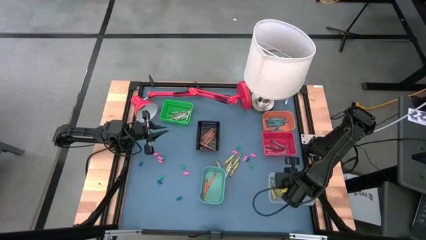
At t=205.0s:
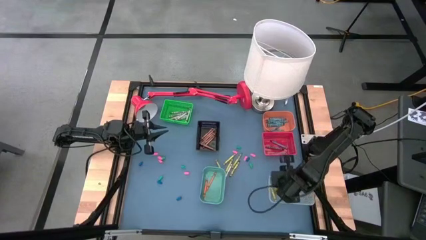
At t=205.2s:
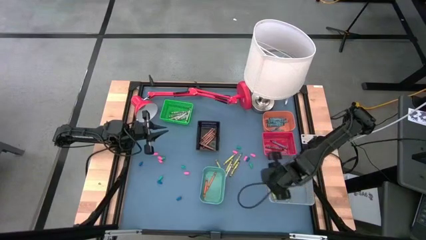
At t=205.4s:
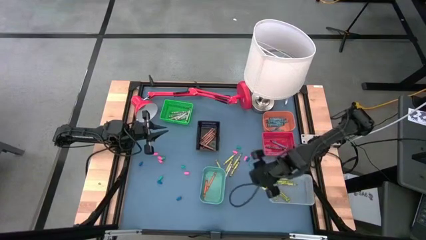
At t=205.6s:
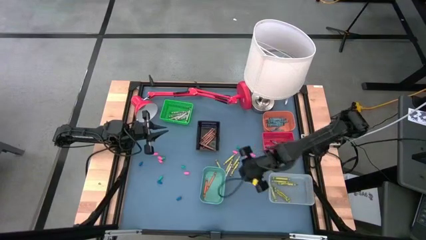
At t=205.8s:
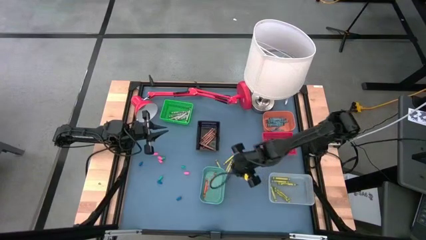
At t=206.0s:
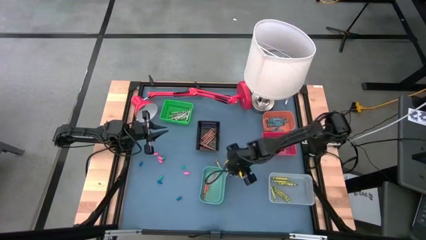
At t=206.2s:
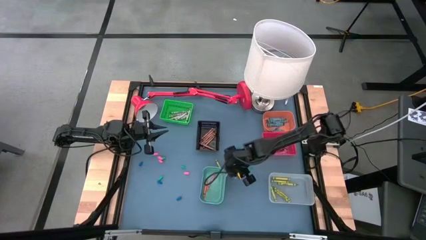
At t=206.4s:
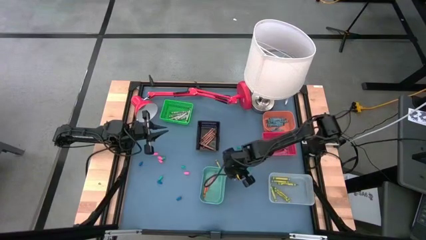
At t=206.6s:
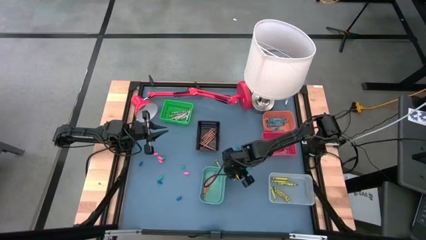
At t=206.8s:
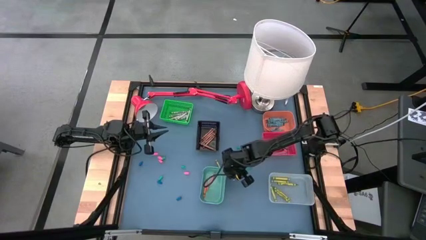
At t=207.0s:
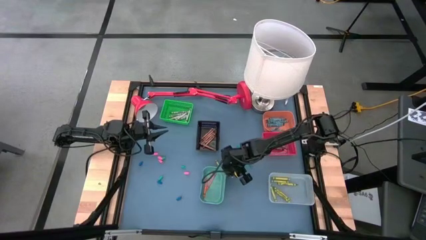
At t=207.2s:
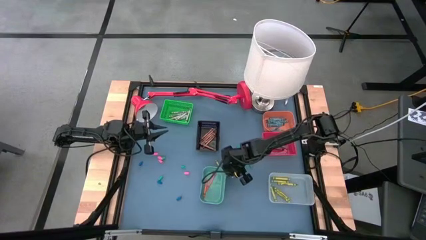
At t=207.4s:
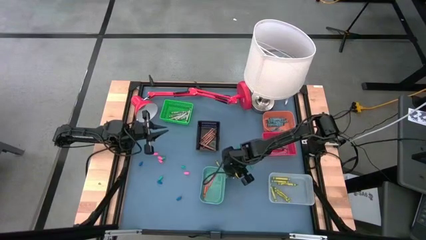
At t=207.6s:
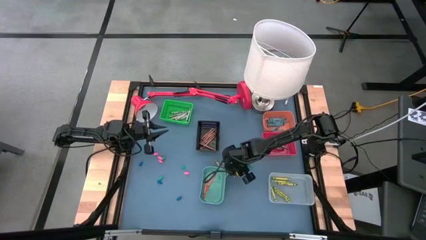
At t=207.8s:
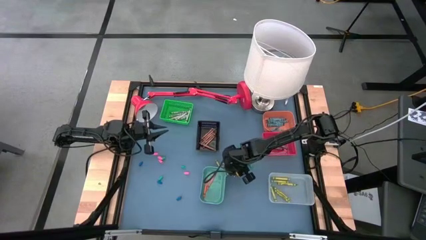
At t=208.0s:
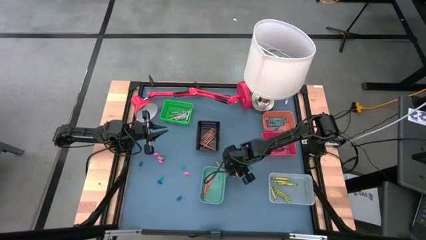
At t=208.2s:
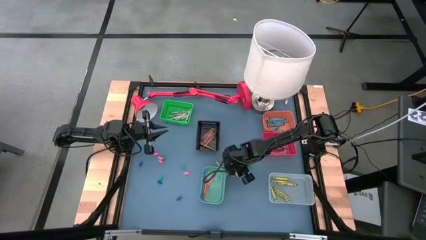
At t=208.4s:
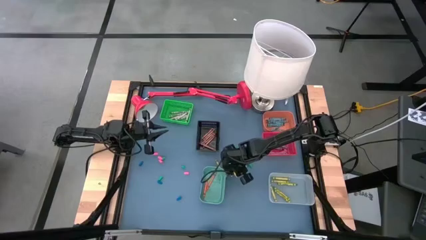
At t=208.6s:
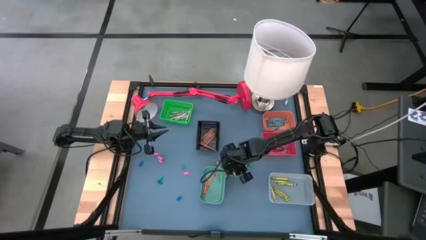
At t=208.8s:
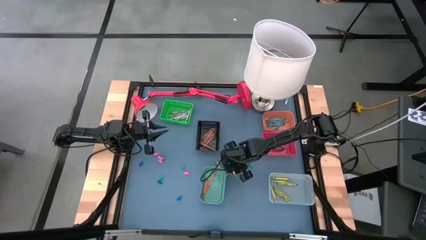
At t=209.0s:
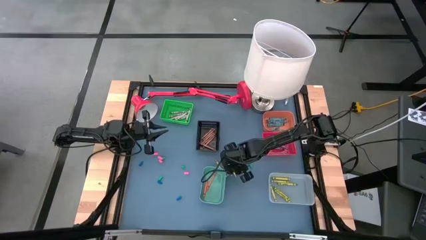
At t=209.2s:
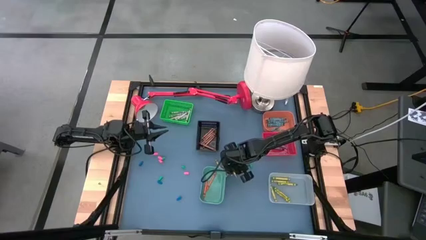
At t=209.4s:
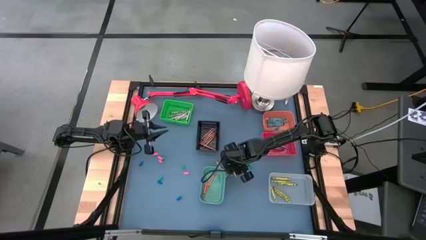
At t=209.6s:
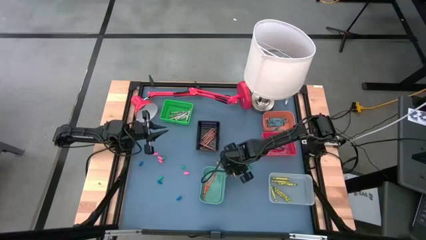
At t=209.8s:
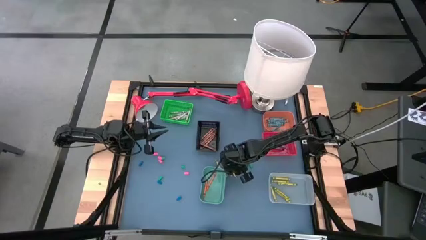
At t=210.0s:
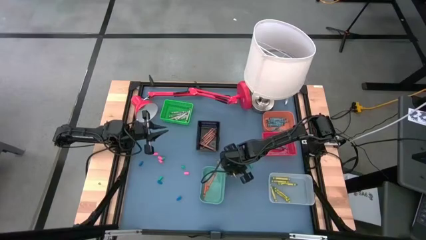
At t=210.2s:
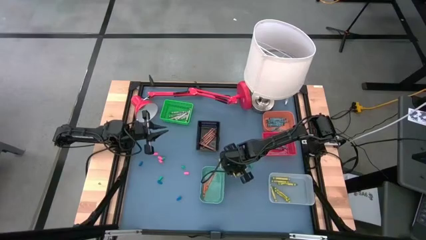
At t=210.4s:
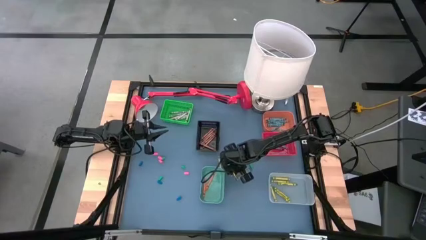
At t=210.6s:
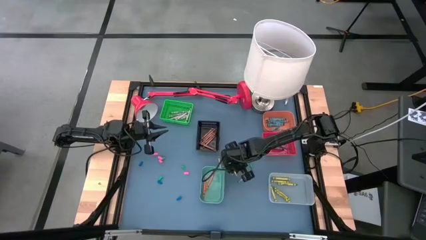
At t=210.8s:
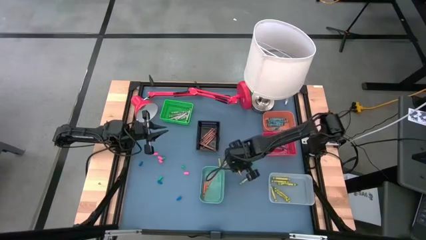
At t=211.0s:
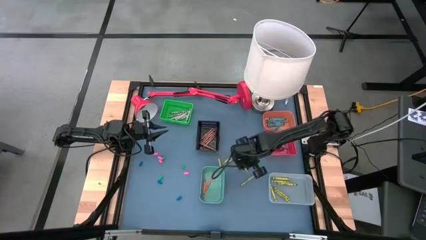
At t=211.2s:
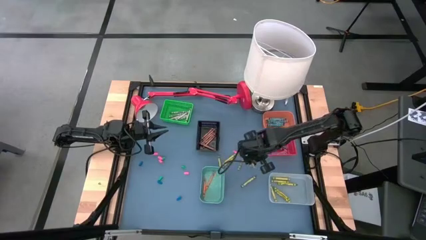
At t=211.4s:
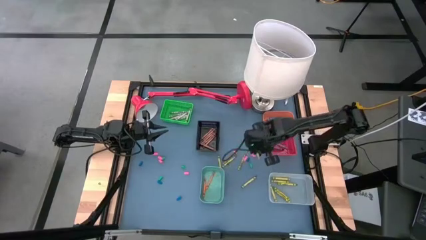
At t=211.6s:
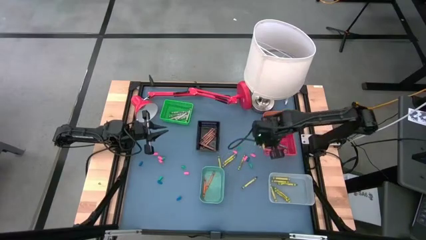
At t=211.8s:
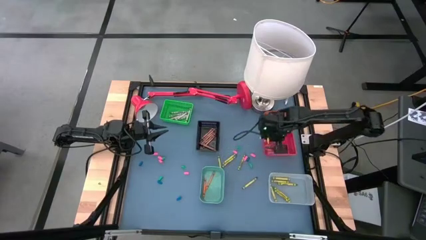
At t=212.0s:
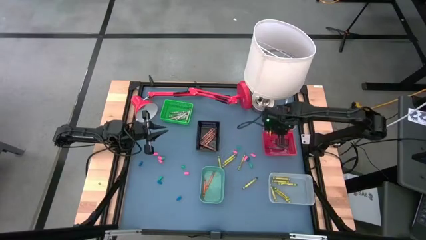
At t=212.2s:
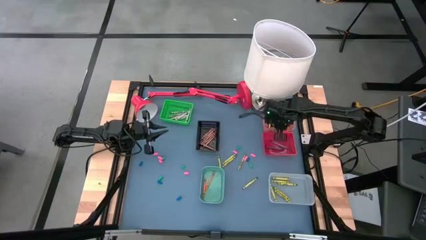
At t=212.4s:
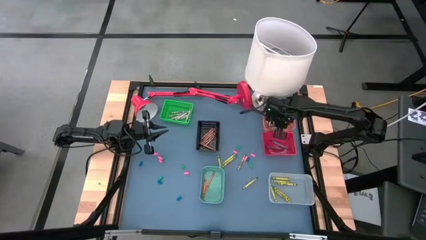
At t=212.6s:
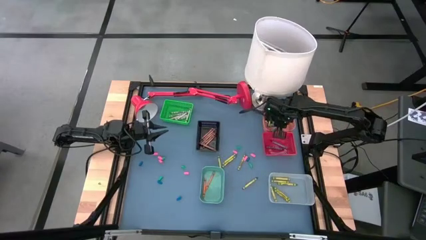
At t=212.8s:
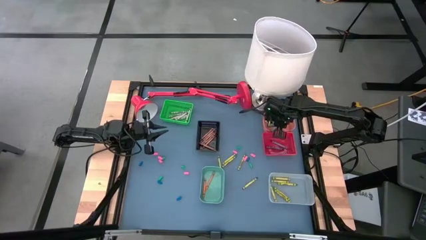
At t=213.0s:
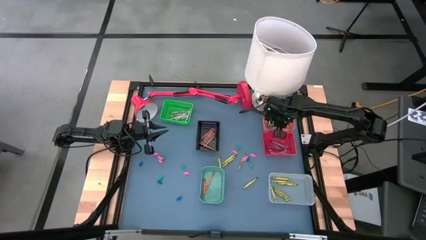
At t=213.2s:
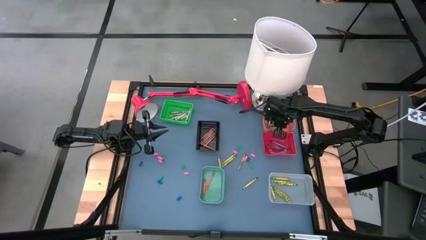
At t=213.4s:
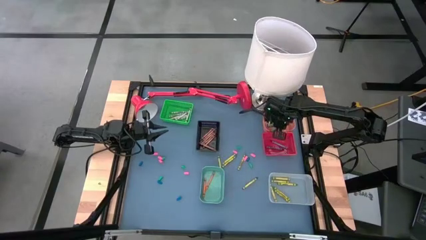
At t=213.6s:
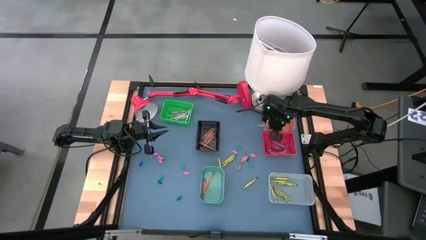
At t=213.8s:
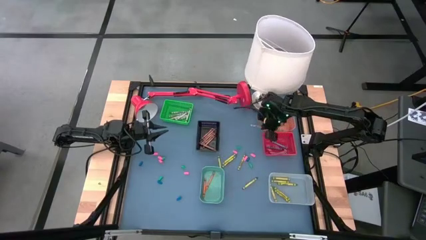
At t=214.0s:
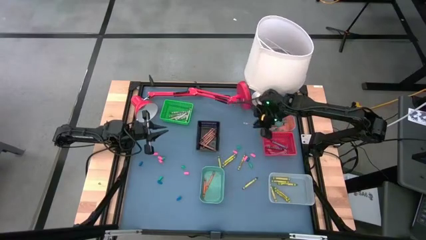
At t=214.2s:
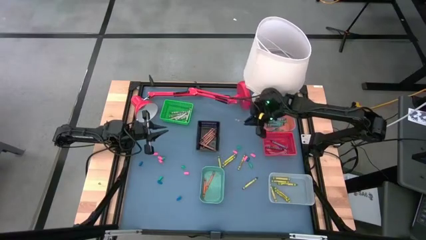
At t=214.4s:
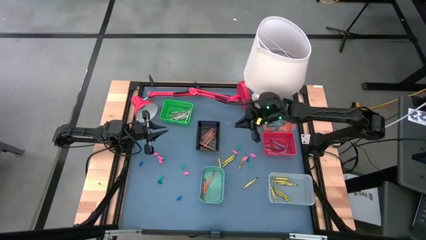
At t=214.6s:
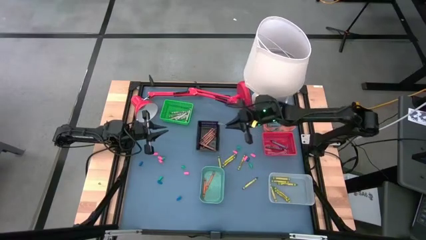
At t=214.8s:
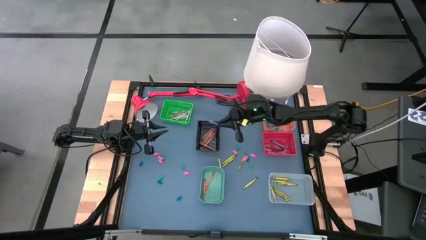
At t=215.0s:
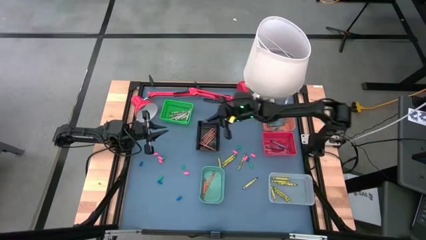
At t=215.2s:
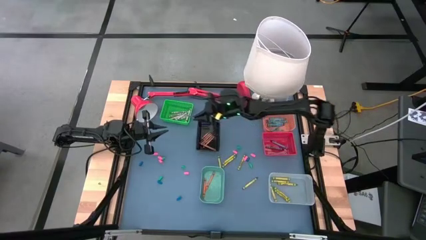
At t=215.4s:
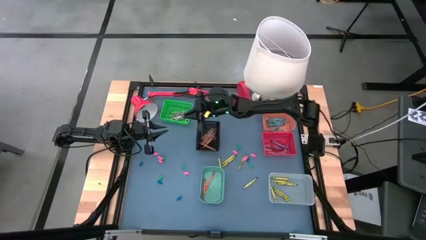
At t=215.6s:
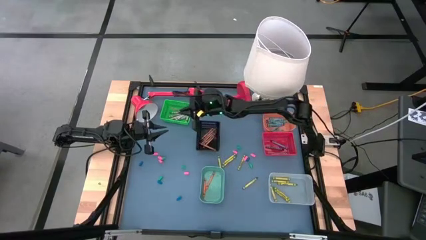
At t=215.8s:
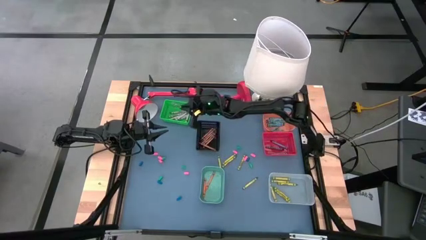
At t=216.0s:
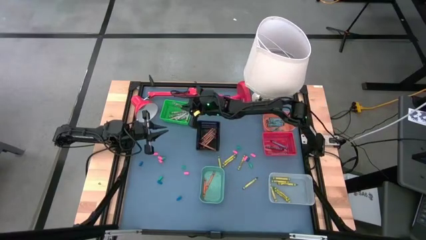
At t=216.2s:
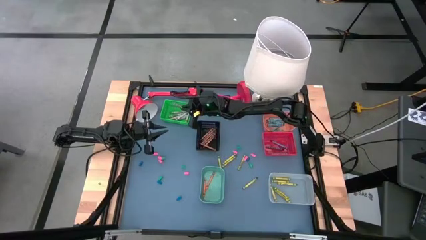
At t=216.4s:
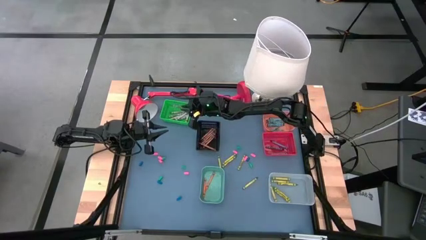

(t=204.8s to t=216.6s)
Task: Sort crayons
Put the gray crayon into the green bin

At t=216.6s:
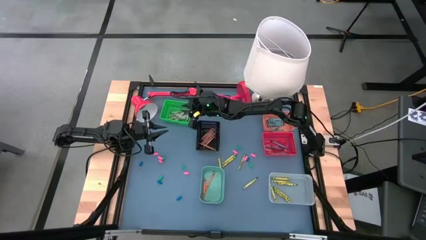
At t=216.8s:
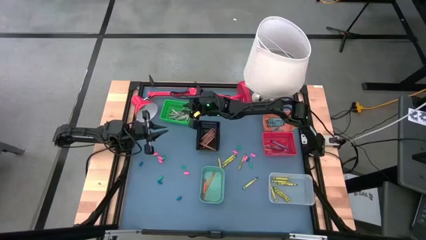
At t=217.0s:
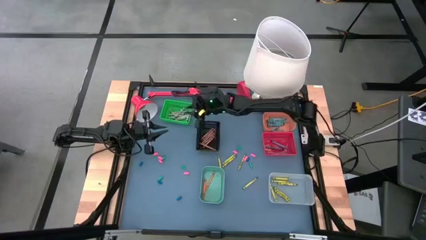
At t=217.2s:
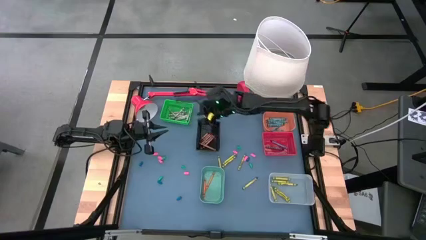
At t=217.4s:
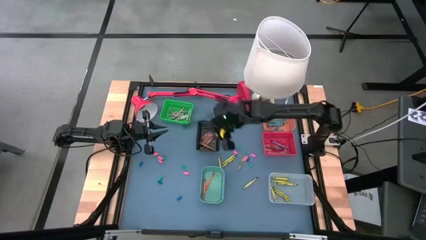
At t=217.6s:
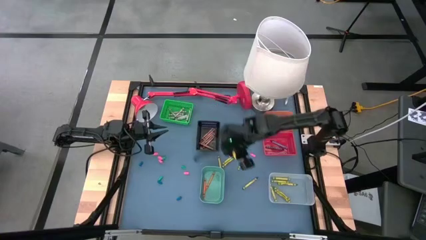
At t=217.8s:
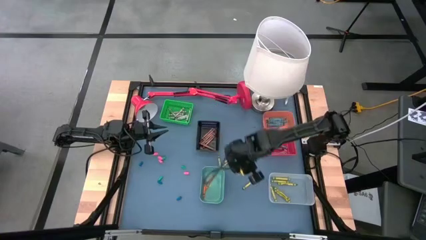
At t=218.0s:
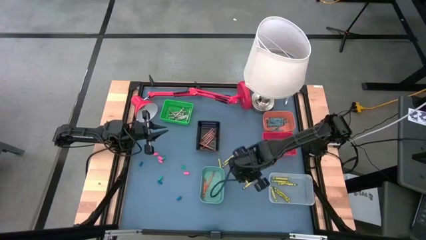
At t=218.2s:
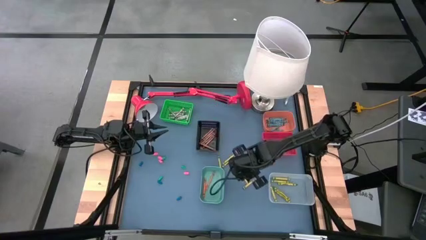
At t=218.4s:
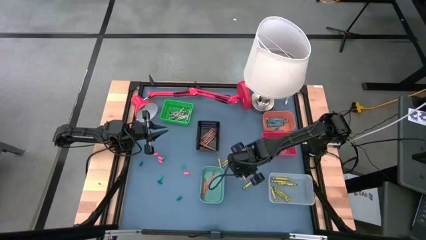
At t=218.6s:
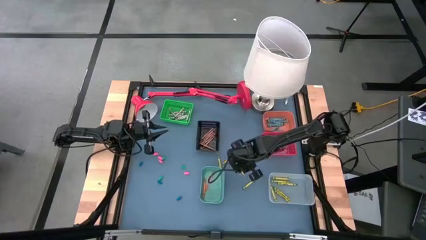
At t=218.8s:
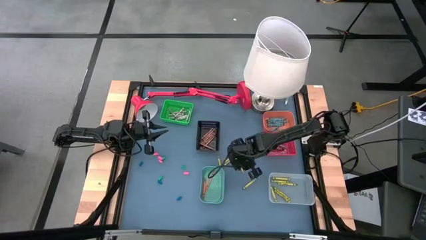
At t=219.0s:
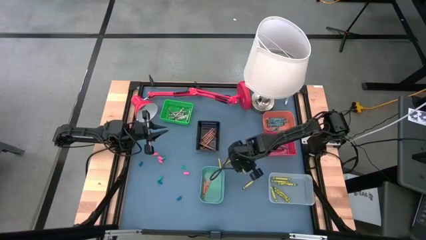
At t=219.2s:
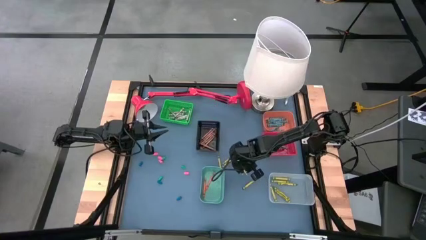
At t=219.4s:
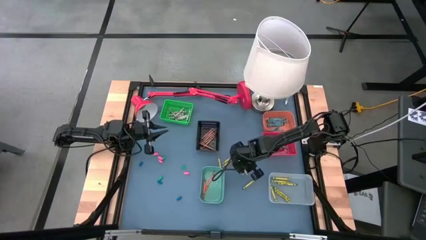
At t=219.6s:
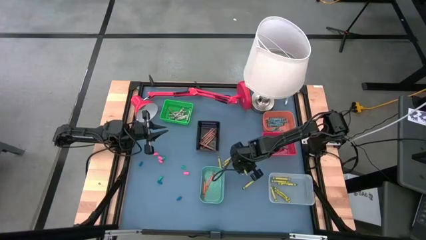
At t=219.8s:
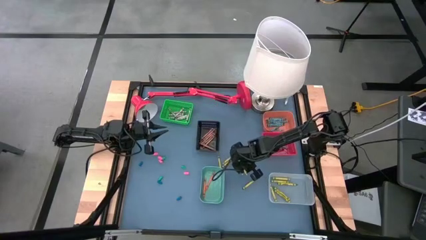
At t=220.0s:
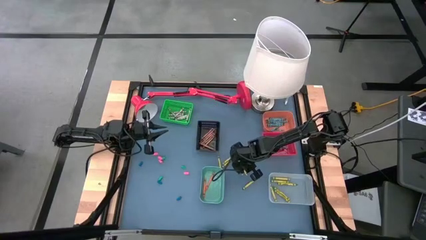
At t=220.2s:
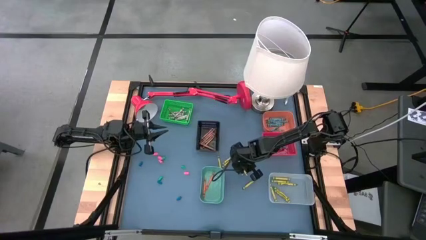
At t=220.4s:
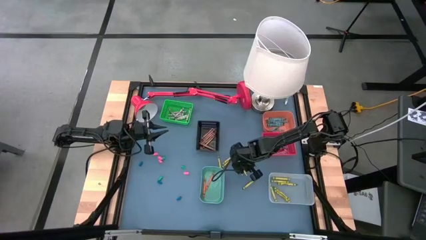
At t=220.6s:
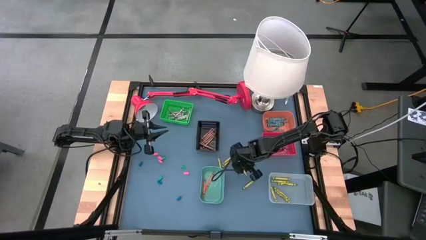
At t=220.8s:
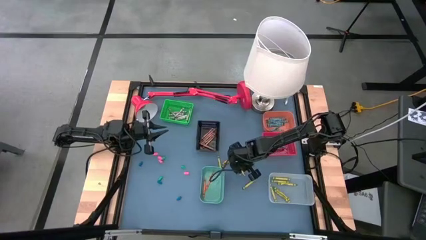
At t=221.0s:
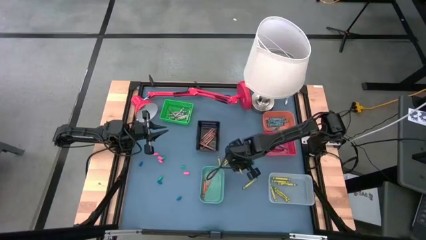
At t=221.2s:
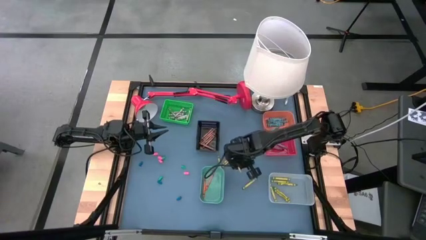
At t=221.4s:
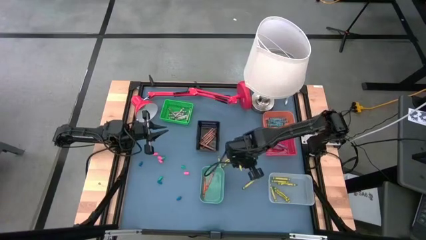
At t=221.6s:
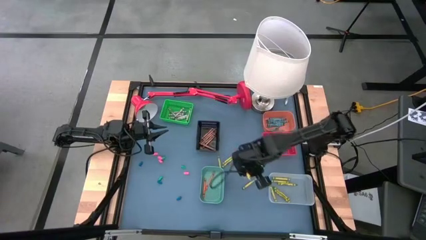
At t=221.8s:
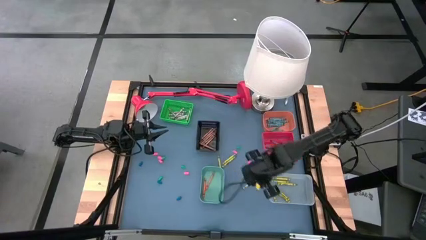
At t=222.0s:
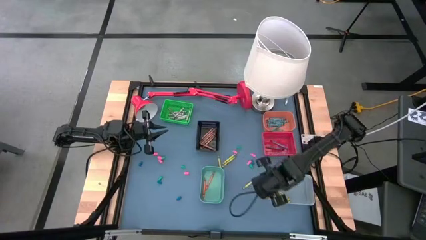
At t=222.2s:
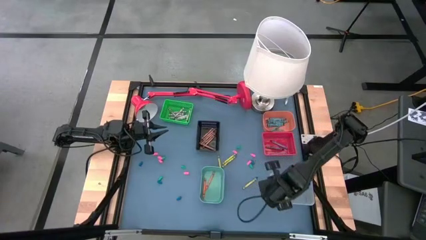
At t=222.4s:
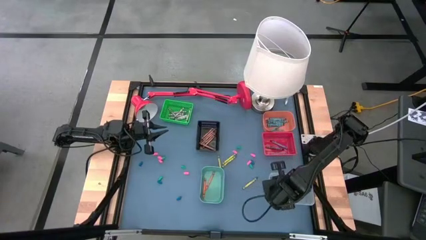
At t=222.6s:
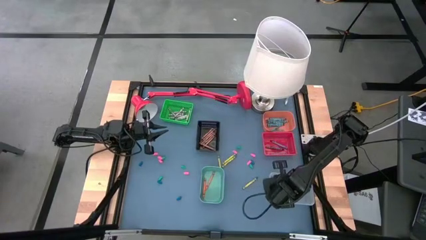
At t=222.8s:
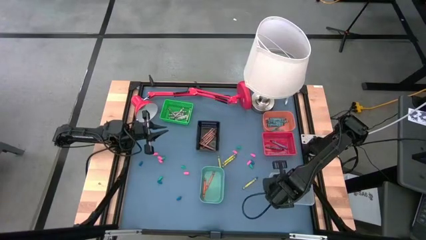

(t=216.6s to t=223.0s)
Put the green crayon into the transparent bin
